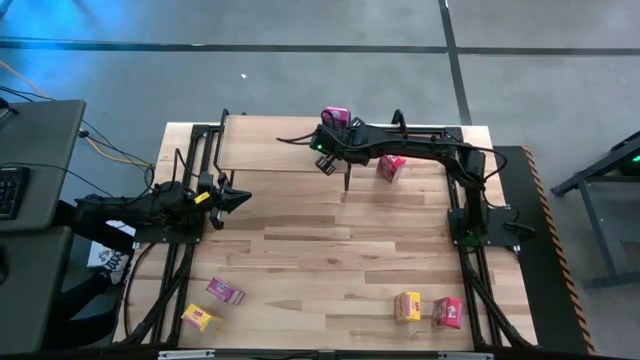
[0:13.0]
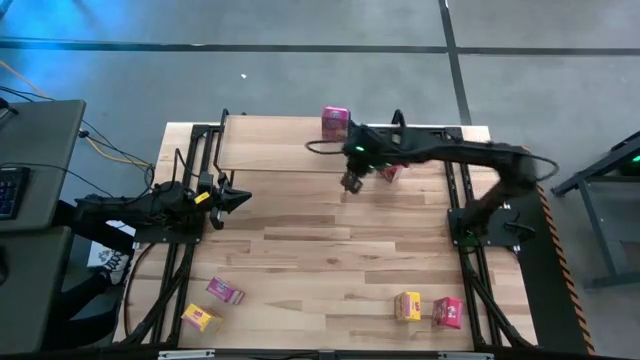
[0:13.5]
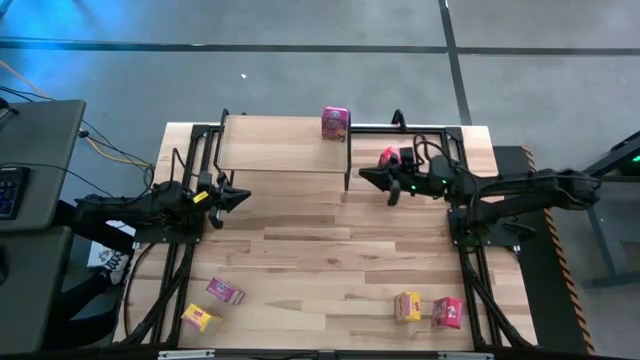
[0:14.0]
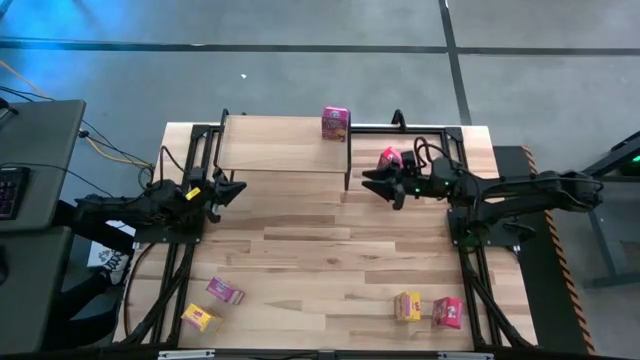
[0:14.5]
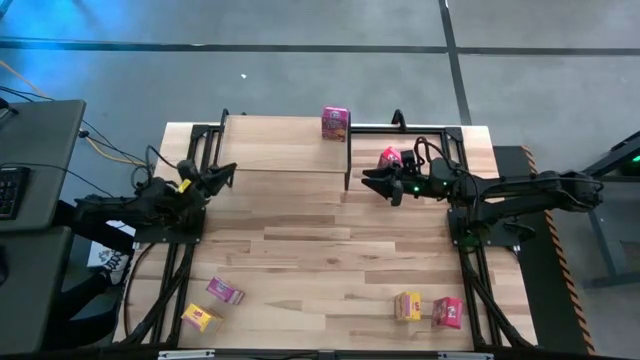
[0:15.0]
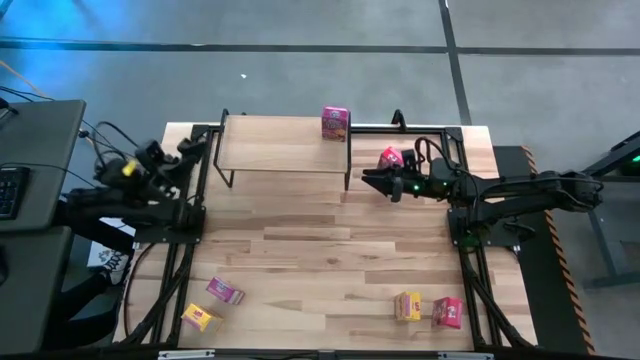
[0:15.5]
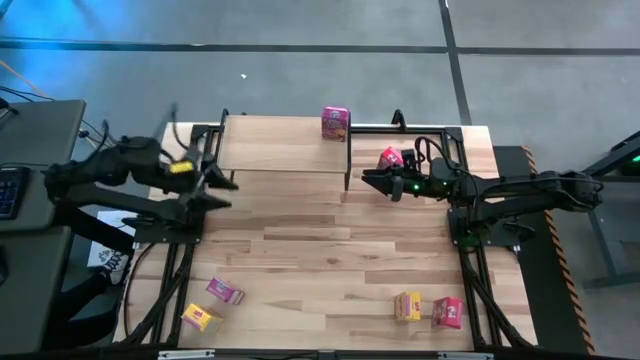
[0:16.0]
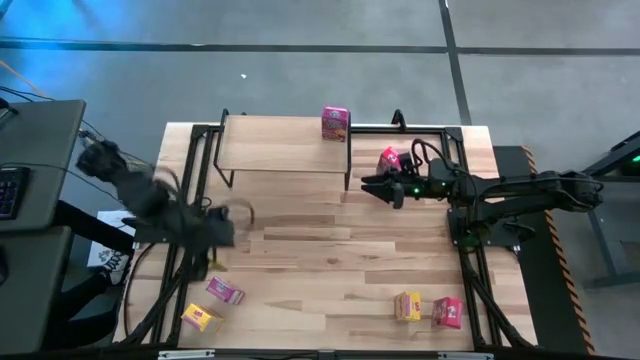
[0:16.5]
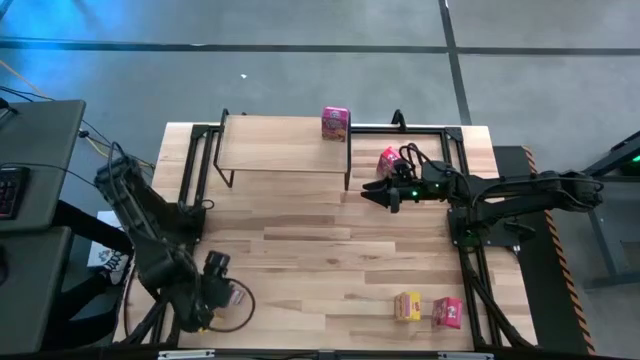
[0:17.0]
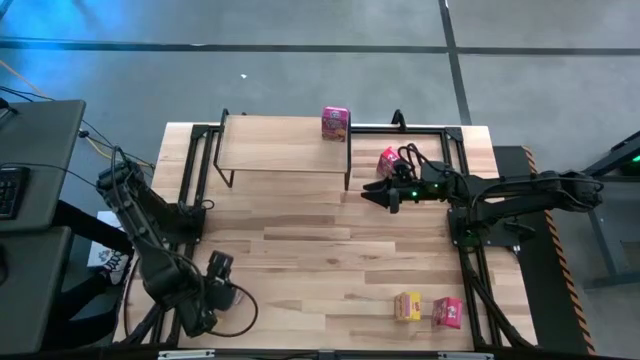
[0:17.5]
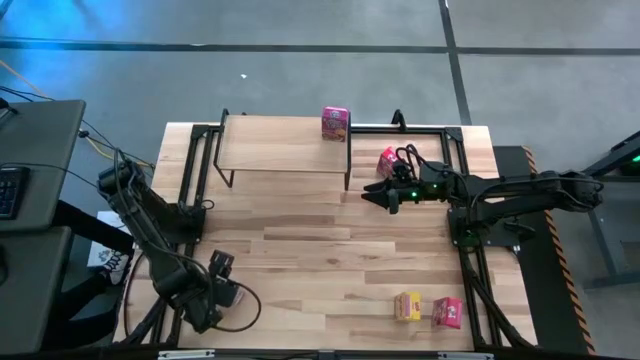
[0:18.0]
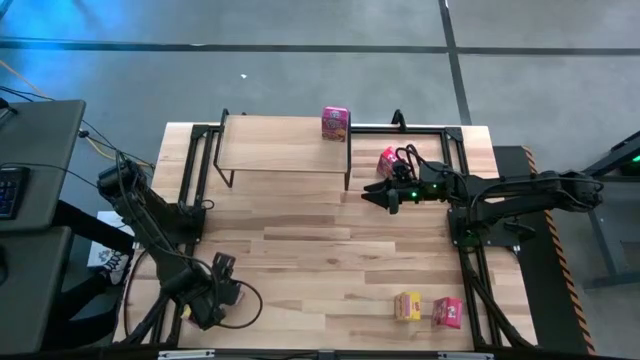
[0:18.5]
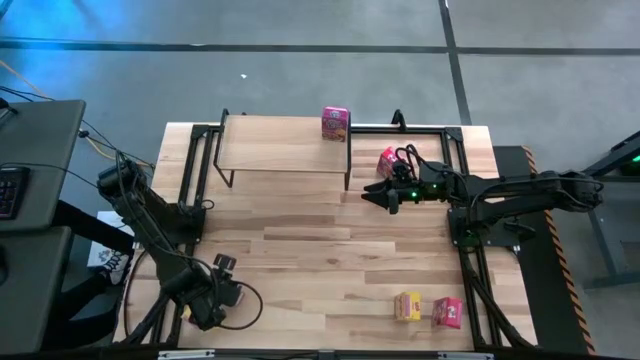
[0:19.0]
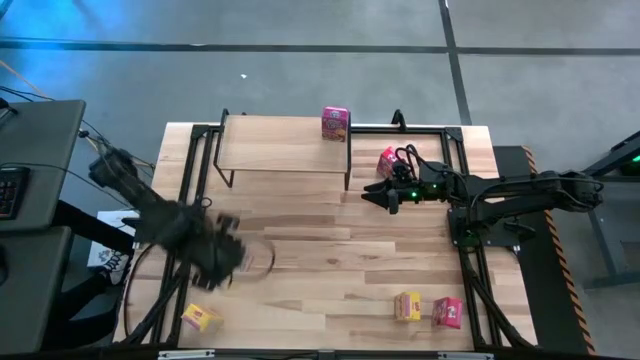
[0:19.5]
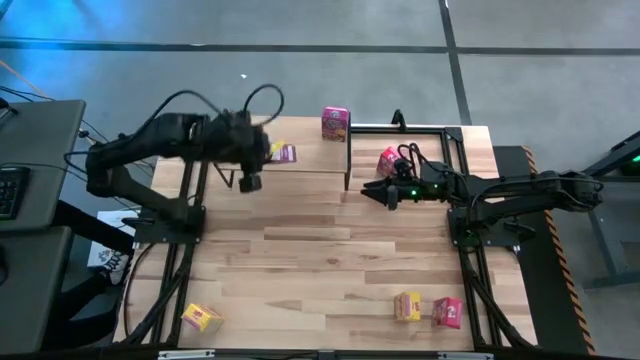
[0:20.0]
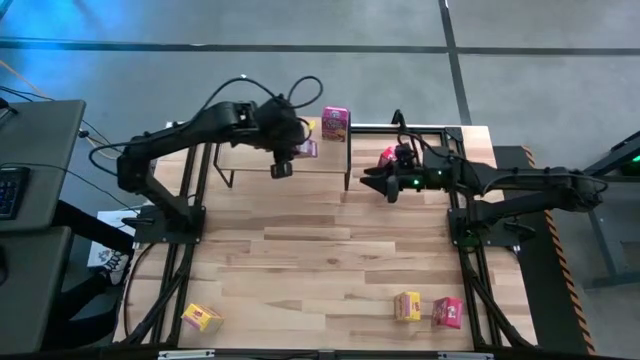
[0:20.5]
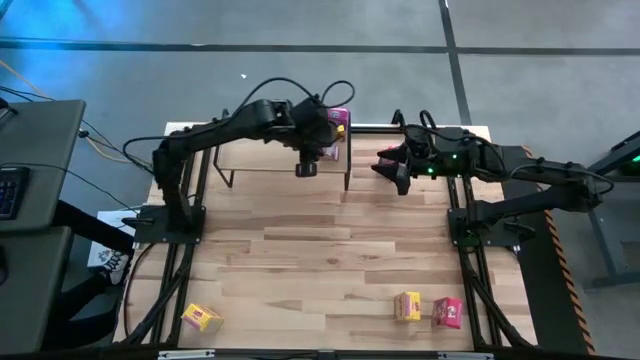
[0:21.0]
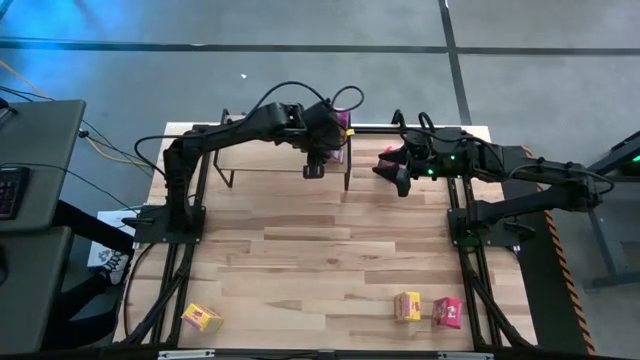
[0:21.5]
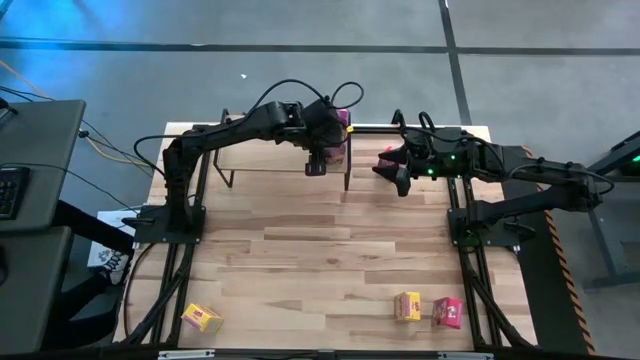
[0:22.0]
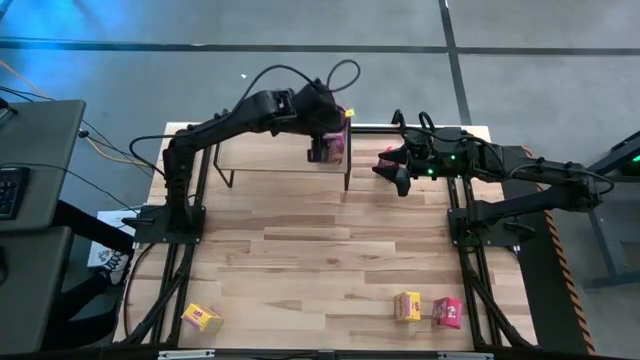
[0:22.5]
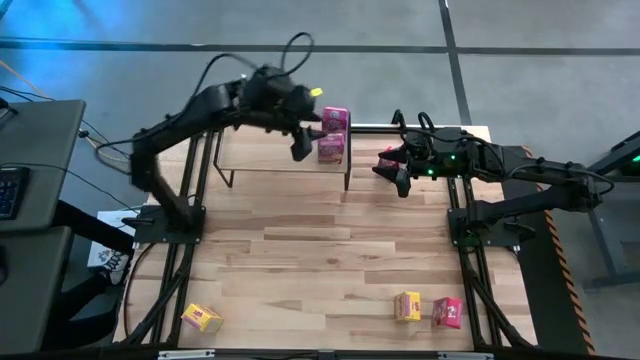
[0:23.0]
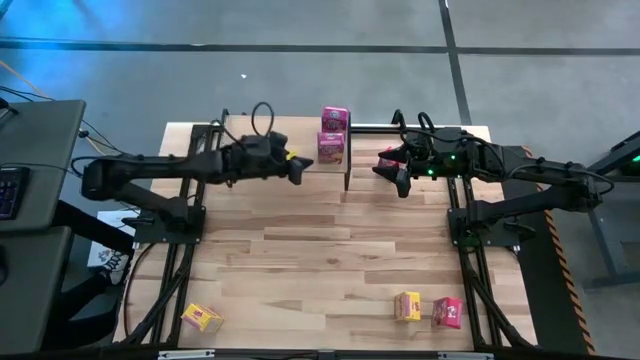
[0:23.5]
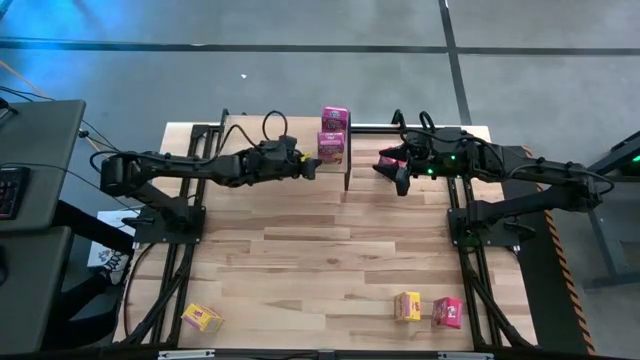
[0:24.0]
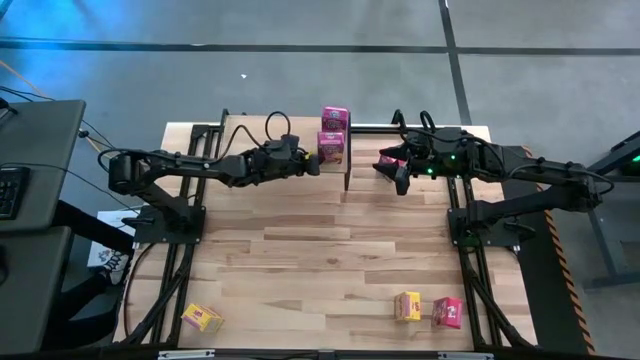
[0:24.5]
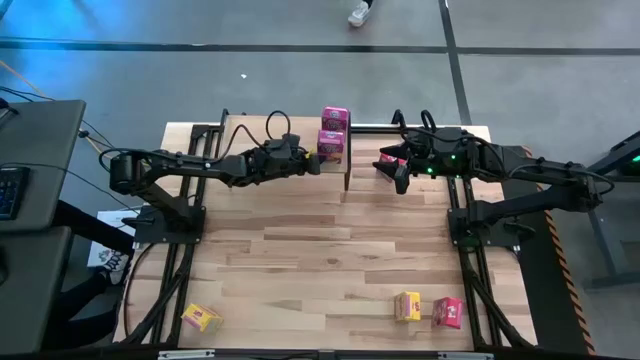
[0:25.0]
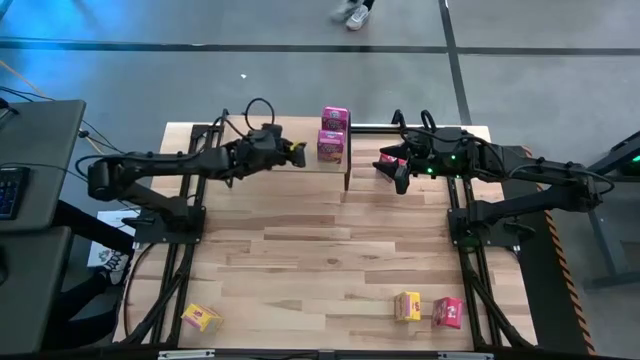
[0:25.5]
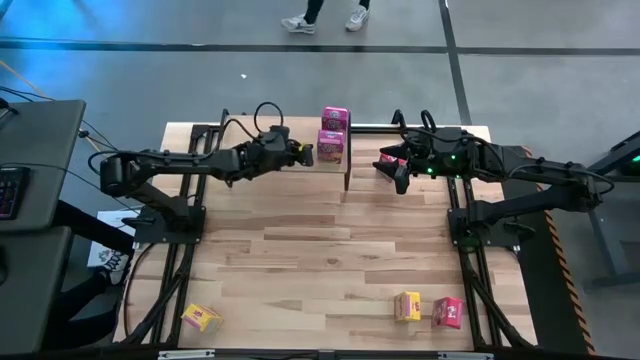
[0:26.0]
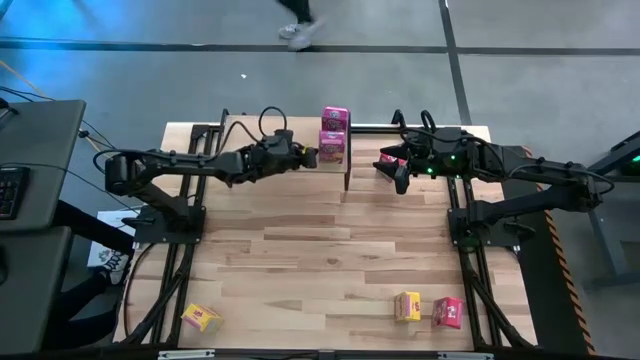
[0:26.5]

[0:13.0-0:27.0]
Task: Stack cereal on shelf
Put the purple cereal box on the shelf aligned with the other purple cereal box

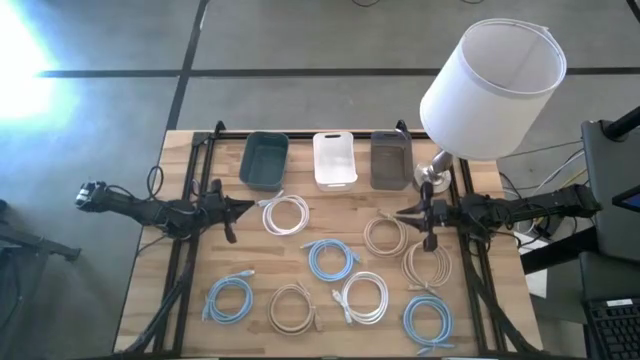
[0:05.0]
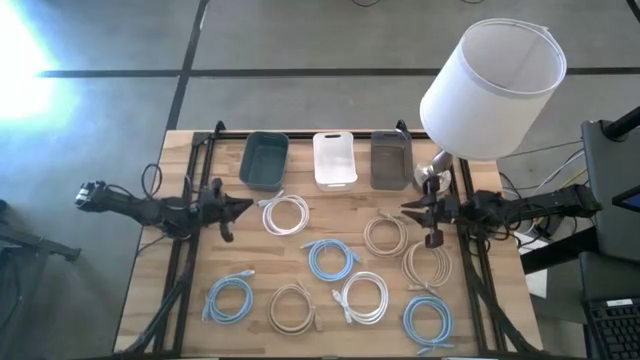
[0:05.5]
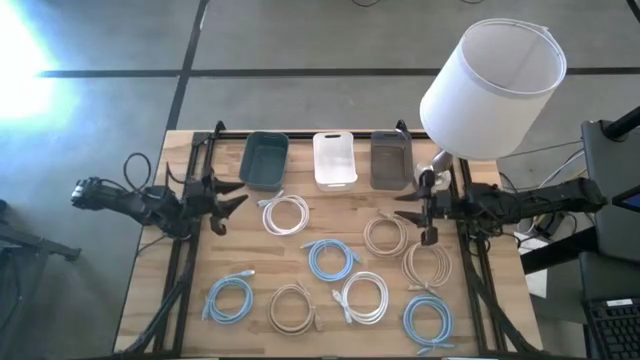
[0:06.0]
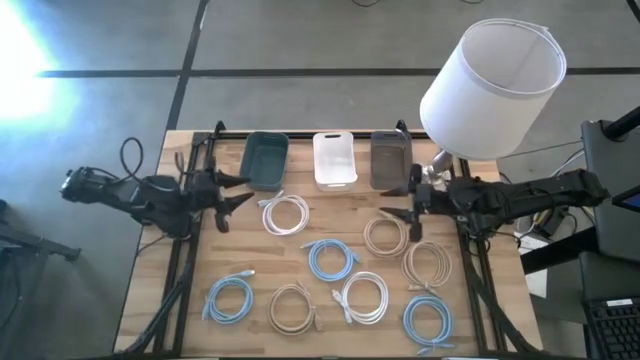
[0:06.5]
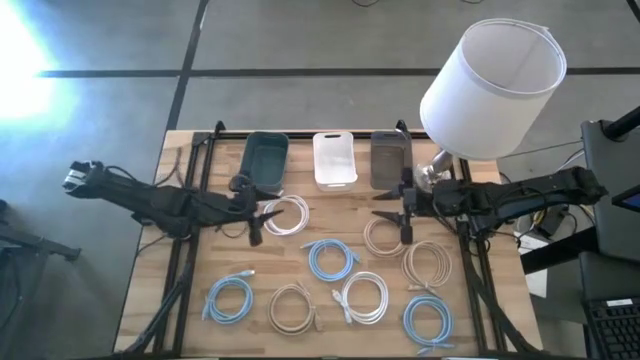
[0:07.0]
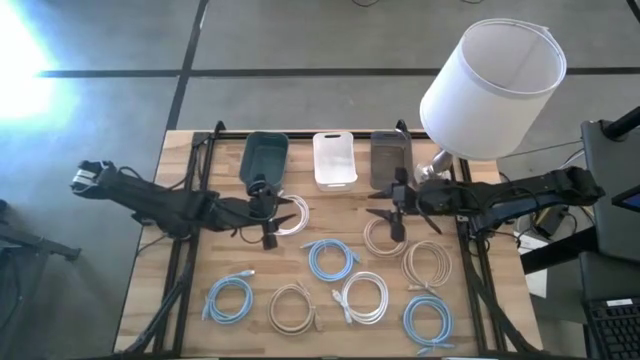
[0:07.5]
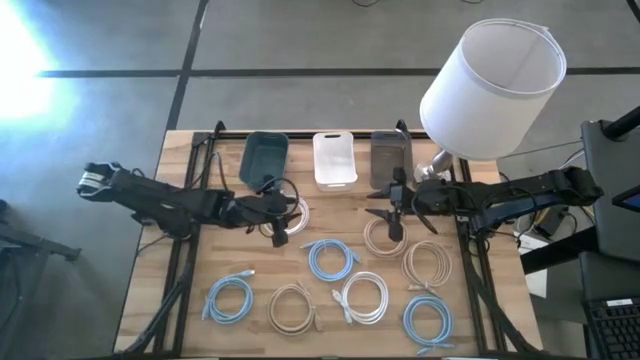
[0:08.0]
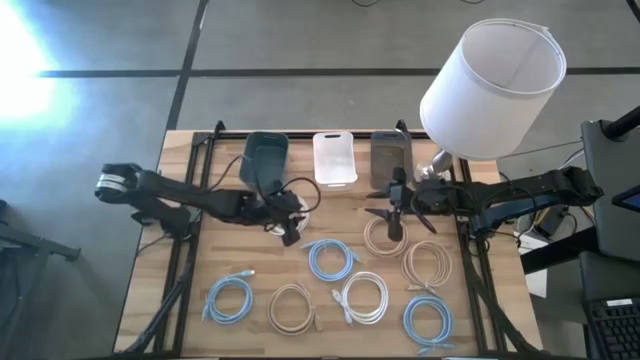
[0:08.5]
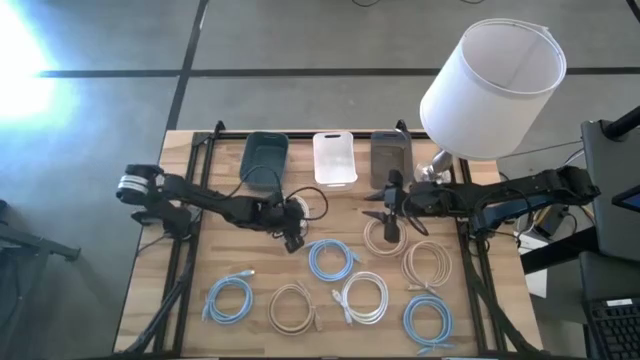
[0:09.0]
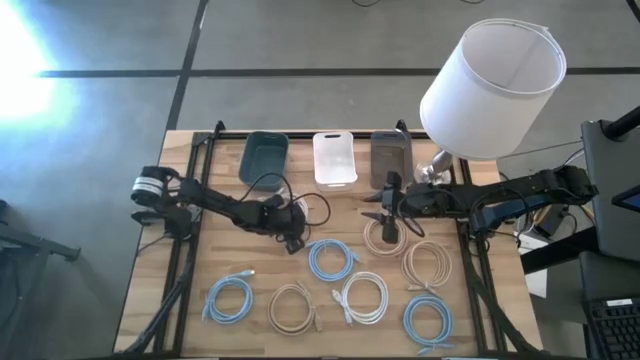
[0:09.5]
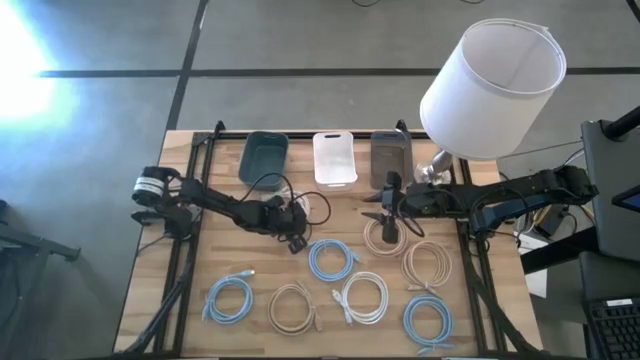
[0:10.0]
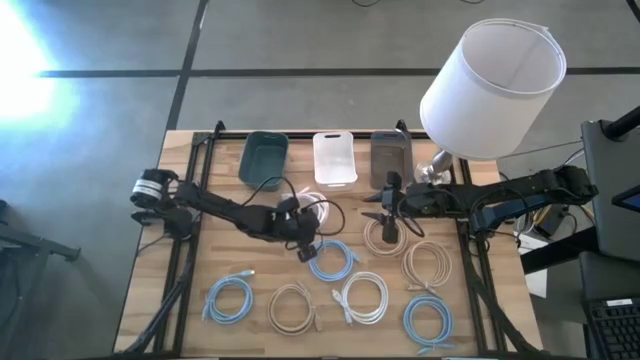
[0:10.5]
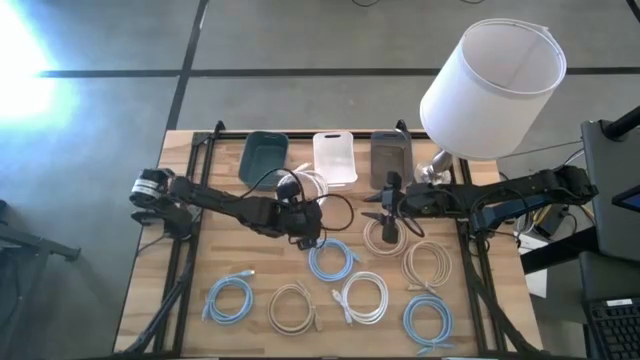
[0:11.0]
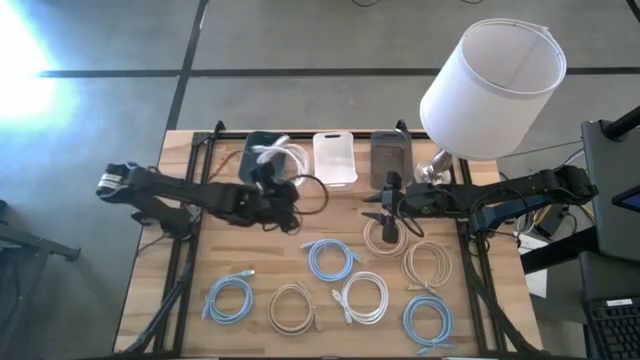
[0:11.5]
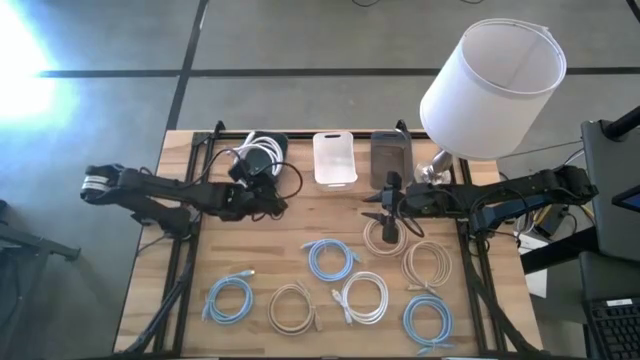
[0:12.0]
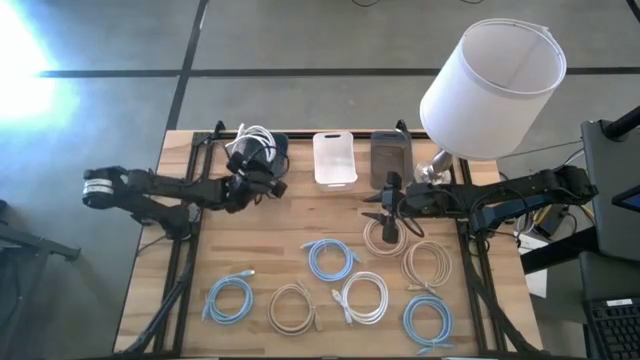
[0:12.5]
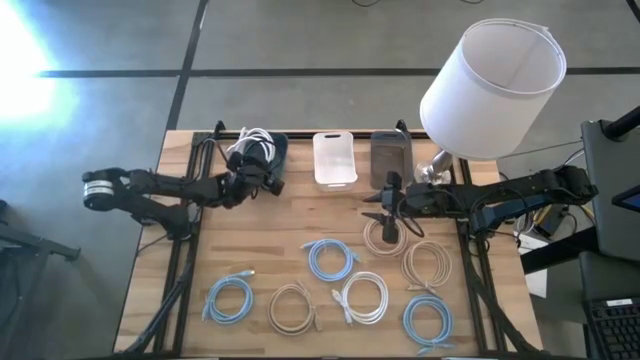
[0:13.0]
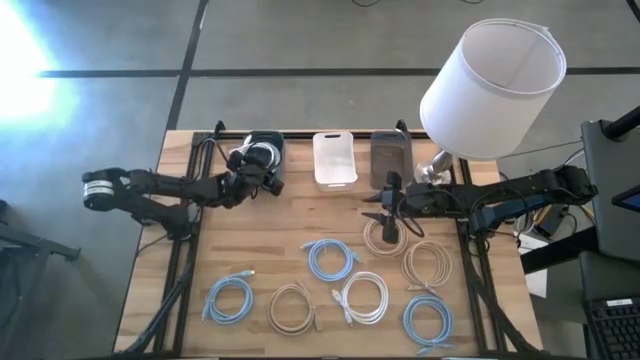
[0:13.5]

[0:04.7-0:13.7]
Task: Sort HDMI cables
Put the top white HDMI cable into the blue bin
